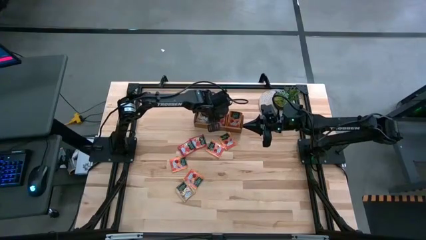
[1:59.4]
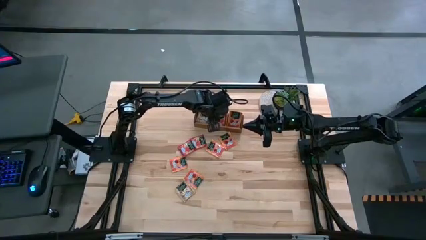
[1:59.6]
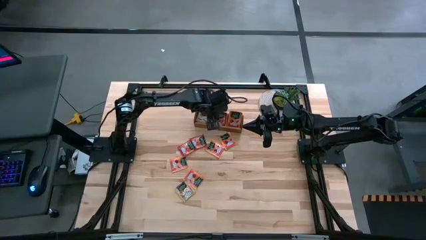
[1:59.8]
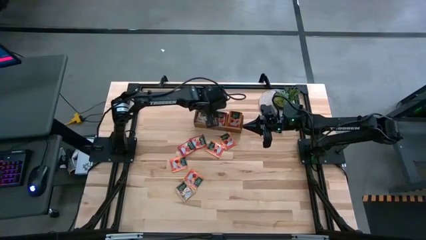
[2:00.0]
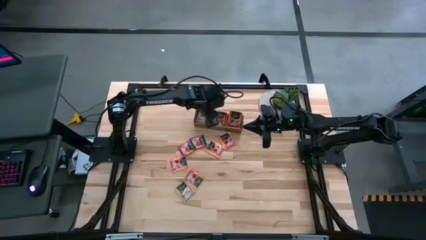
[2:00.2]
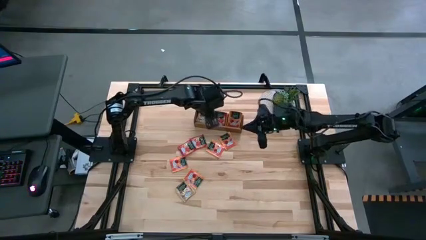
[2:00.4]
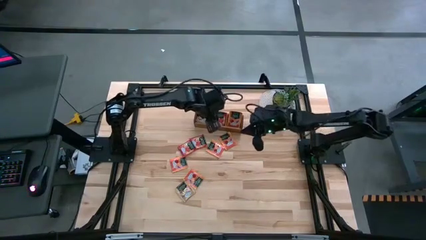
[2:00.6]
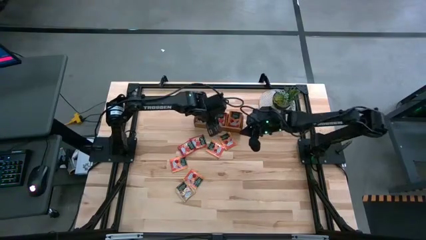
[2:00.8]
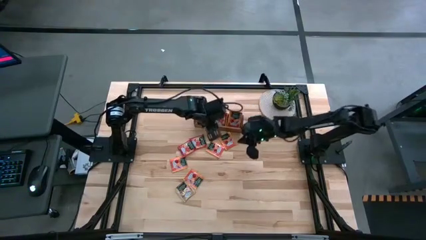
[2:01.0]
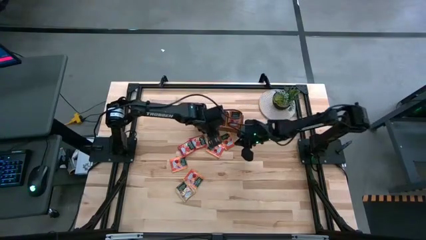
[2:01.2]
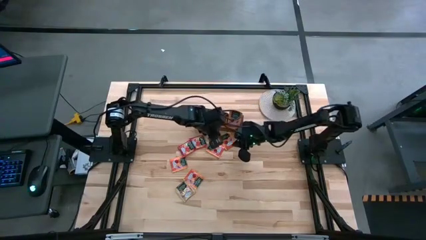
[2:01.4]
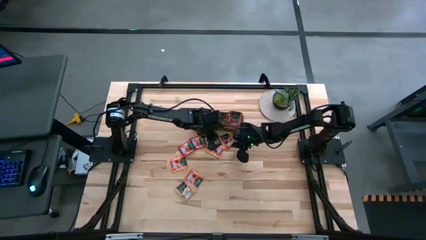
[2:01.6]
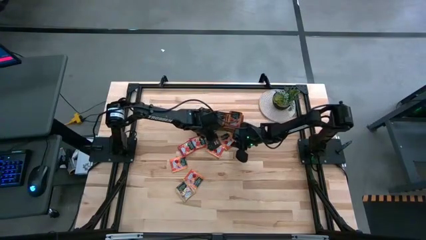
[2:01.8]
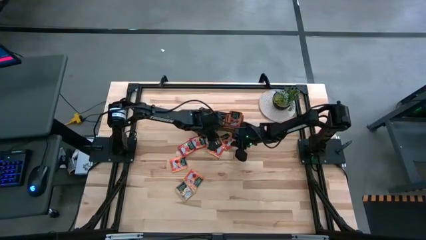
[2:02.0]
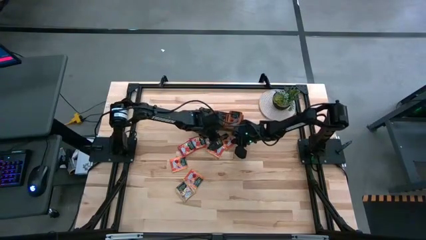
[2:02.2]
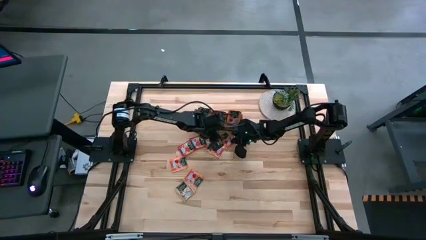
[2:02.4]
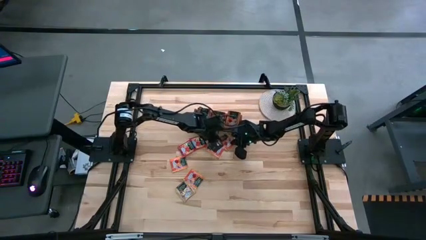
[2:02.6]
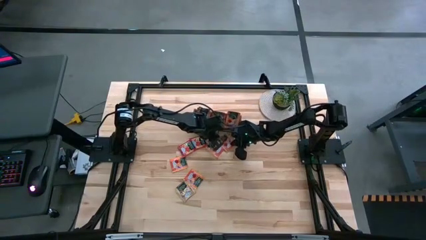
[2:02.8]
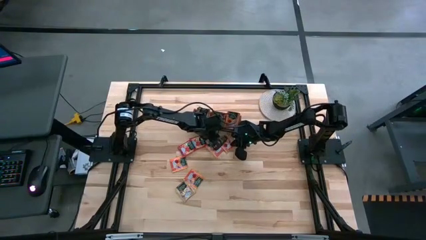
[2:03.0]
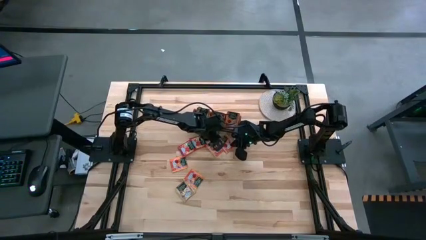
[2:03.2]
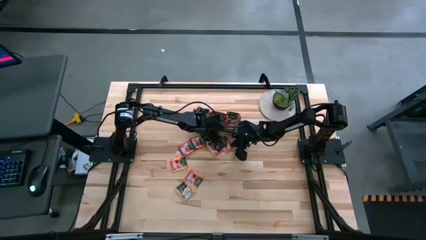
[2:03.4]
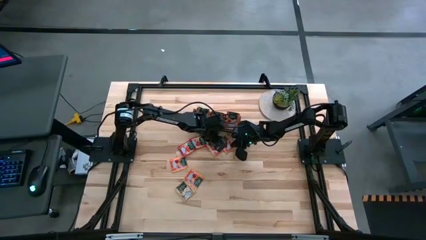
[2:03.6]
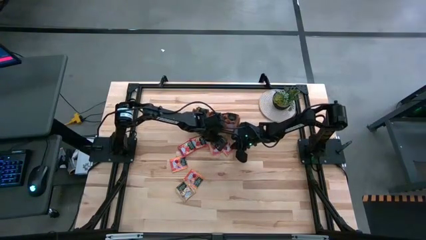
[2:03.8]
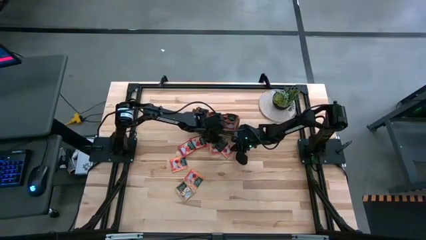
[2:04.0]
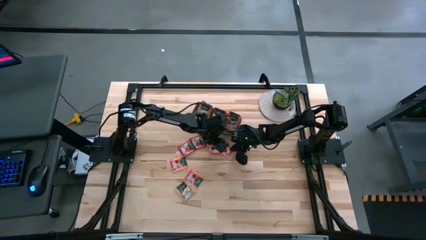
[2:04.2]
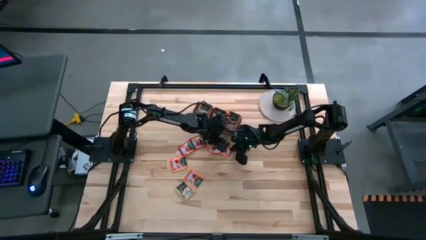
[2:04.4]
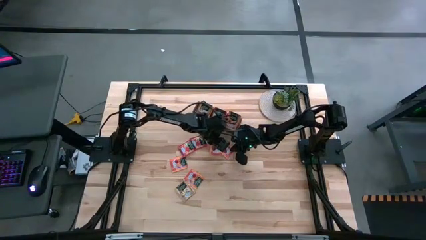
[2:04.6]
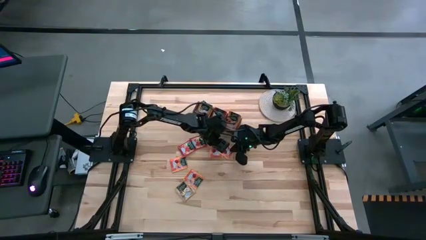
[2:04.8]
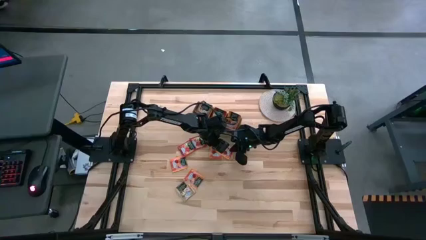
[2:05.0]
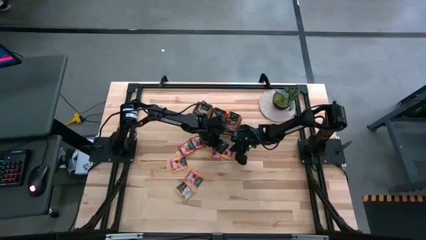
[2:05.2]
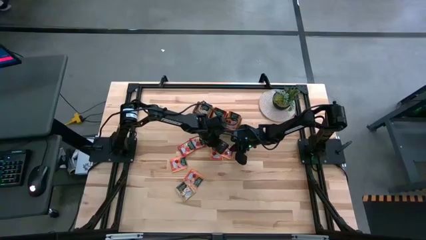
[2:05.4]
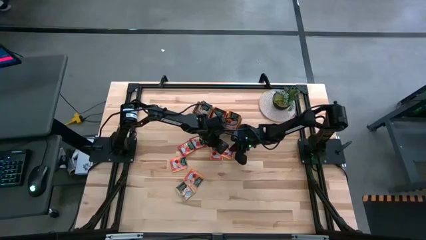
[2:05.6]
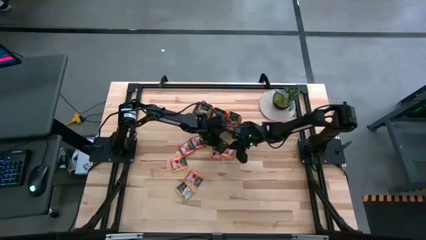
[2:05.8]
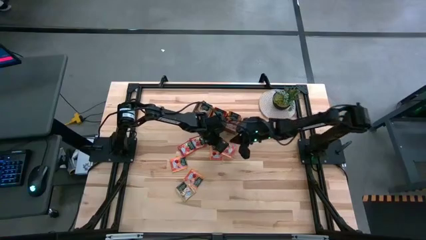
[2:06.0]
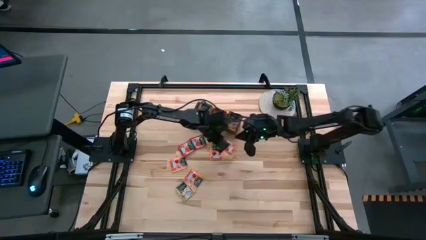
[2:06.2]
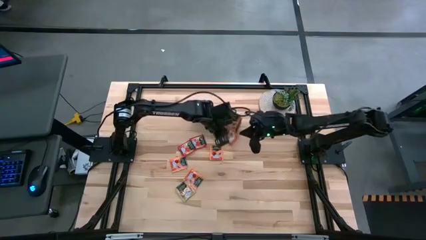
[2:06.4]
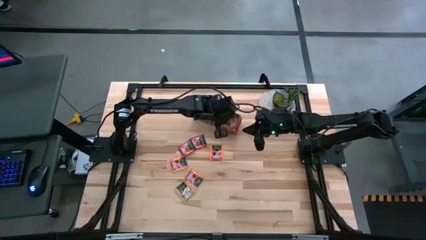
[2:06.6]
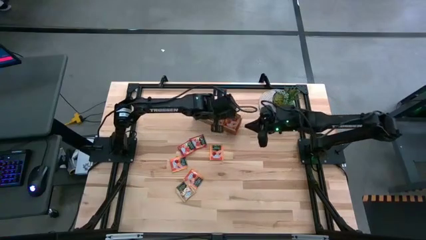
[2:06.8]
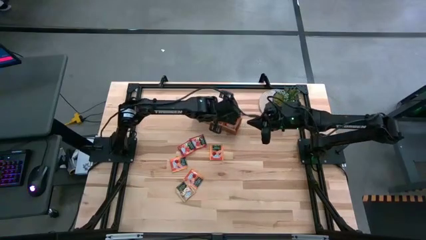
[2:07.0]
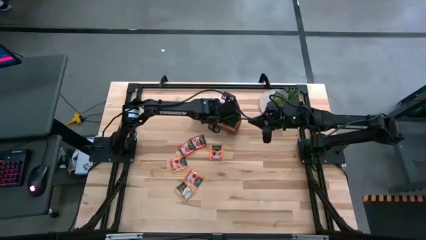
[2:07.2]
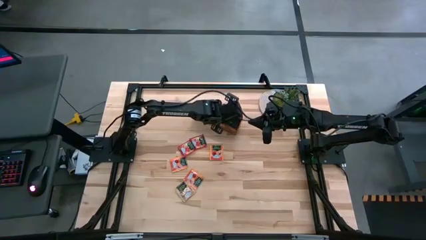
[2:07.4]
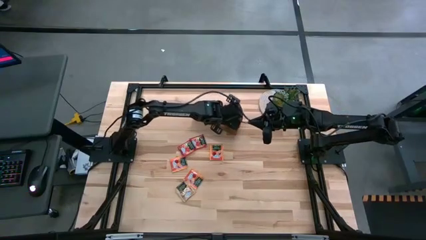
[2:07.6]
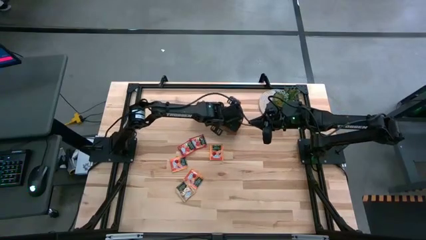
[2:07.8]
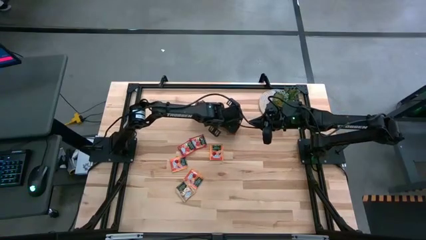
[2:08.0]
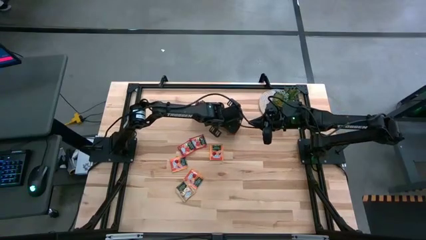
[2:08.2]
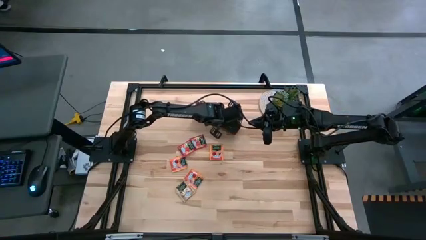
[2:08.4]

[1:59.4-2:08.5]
Task: Pick & Place Tea
Put the orange tea bag into the right section of the wooden organizer

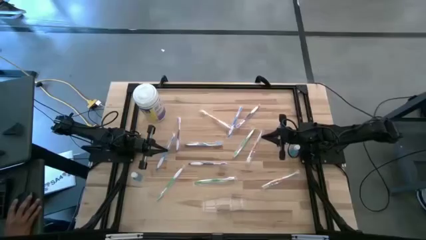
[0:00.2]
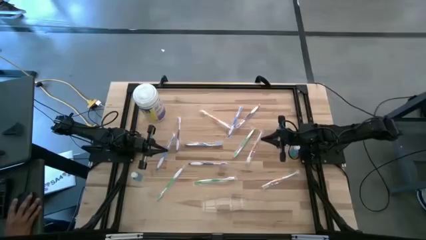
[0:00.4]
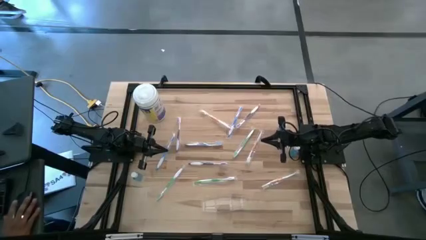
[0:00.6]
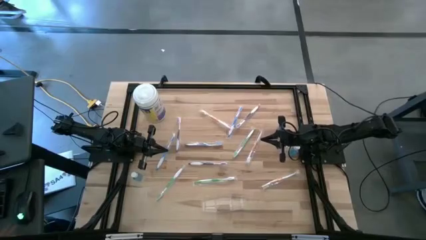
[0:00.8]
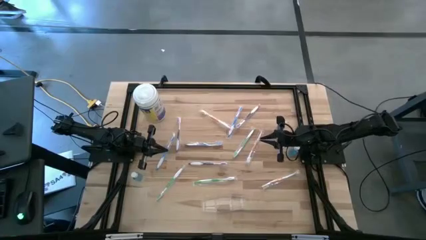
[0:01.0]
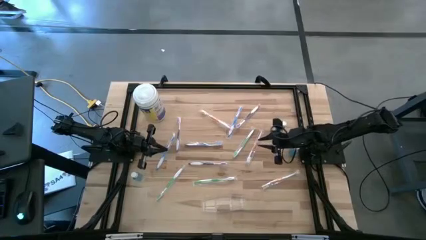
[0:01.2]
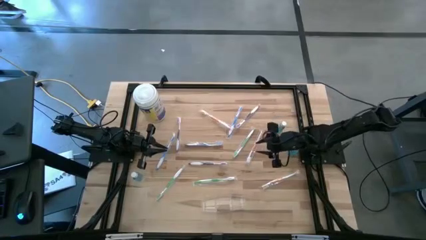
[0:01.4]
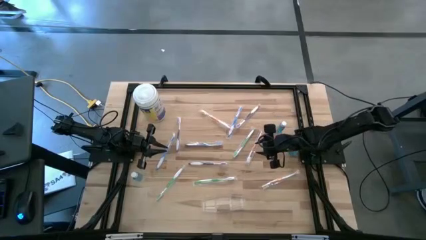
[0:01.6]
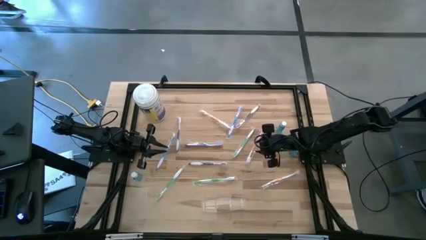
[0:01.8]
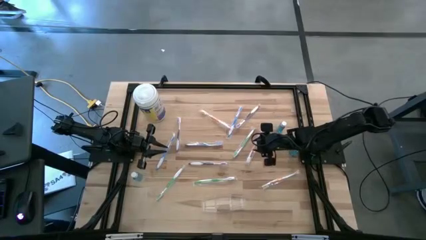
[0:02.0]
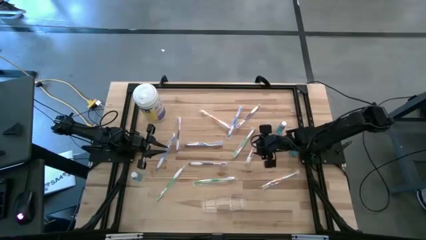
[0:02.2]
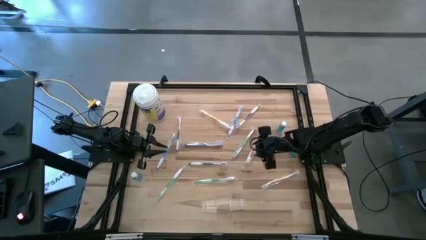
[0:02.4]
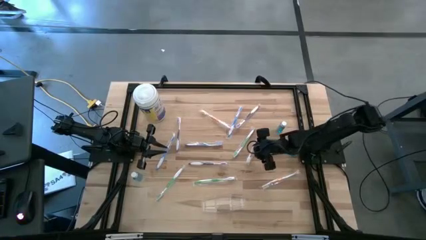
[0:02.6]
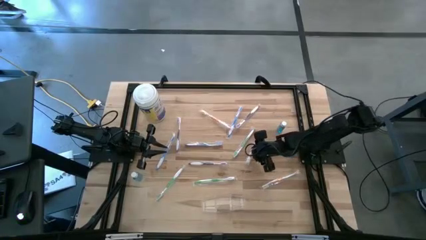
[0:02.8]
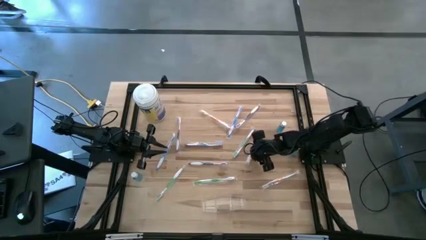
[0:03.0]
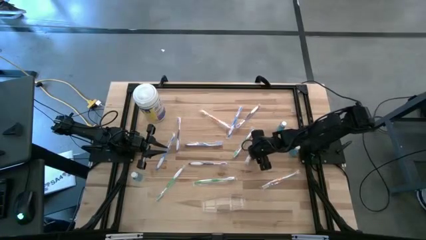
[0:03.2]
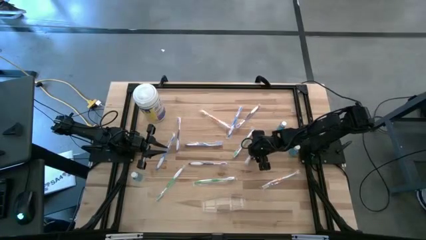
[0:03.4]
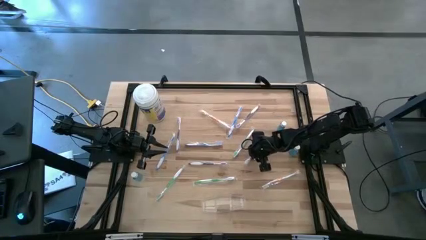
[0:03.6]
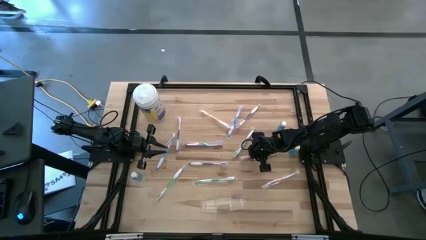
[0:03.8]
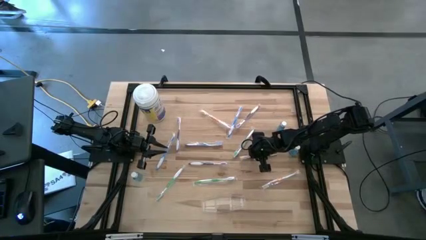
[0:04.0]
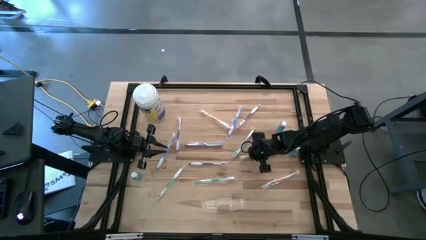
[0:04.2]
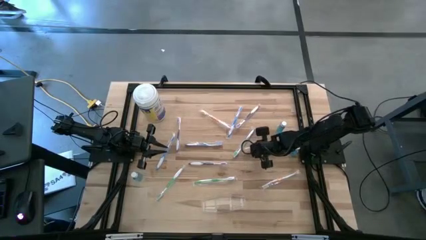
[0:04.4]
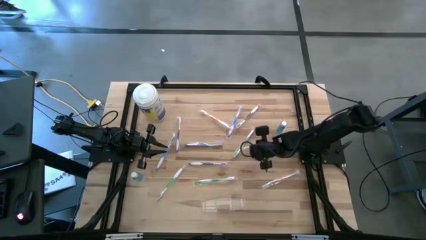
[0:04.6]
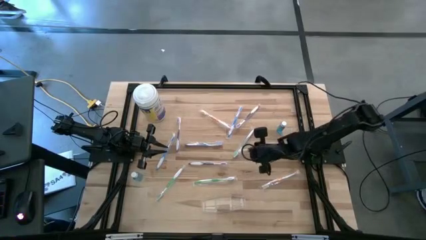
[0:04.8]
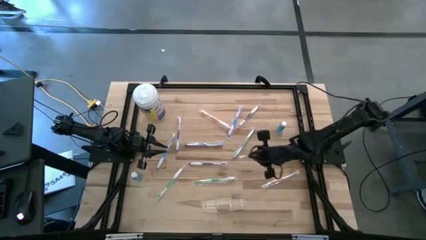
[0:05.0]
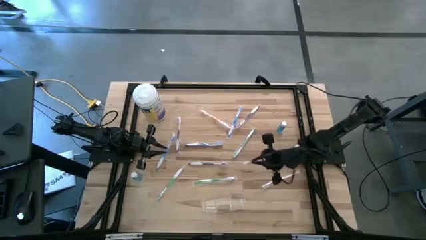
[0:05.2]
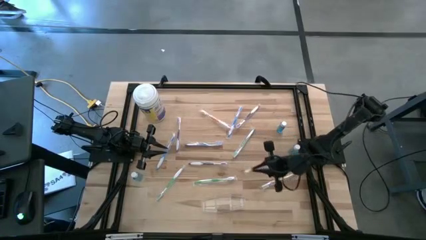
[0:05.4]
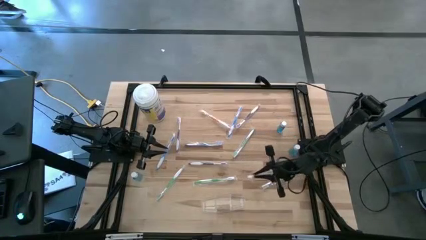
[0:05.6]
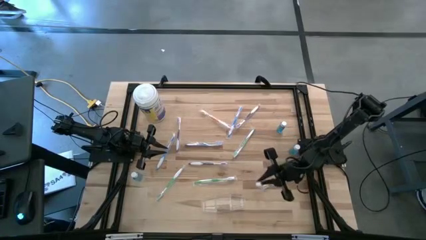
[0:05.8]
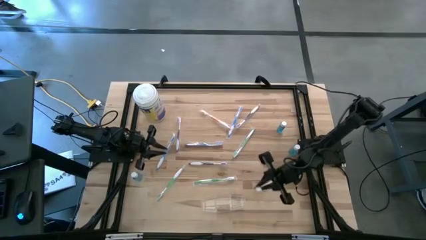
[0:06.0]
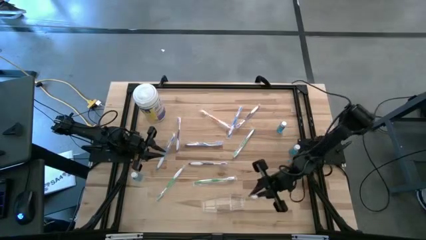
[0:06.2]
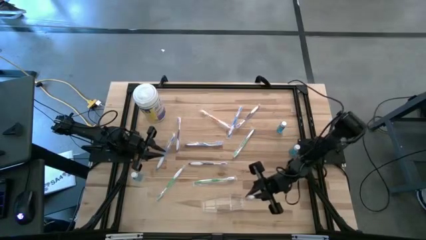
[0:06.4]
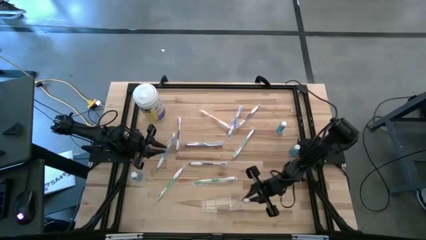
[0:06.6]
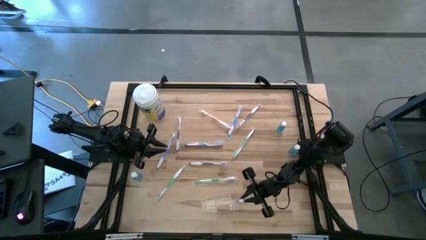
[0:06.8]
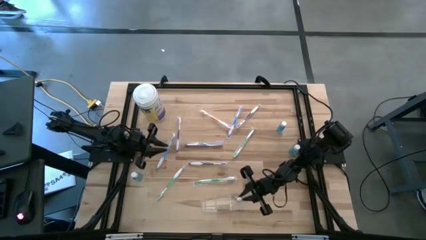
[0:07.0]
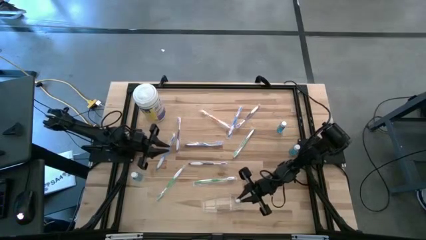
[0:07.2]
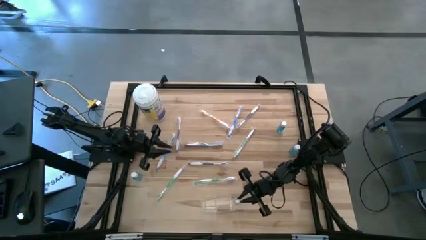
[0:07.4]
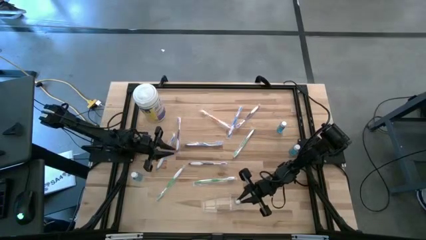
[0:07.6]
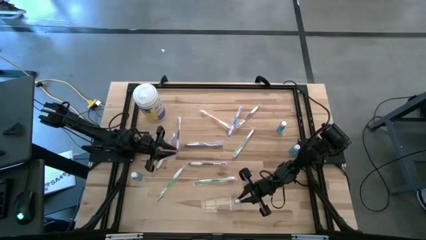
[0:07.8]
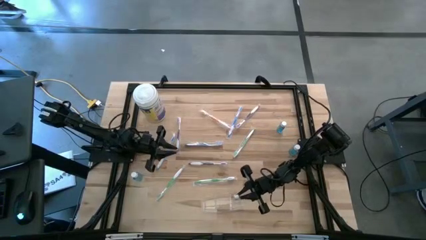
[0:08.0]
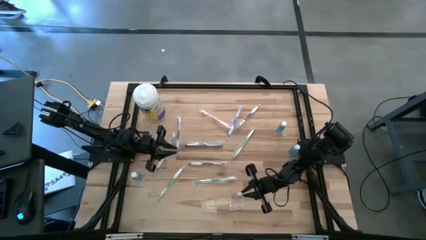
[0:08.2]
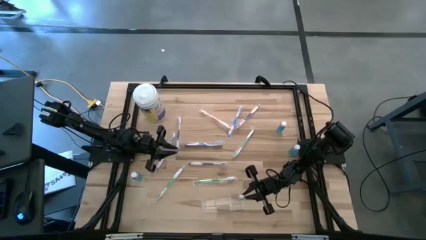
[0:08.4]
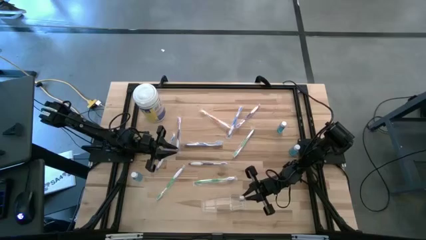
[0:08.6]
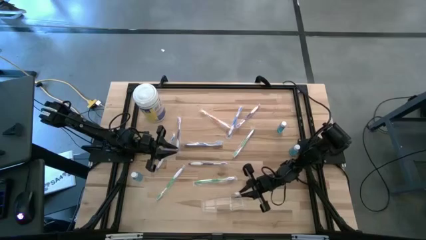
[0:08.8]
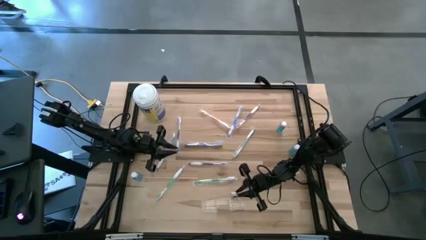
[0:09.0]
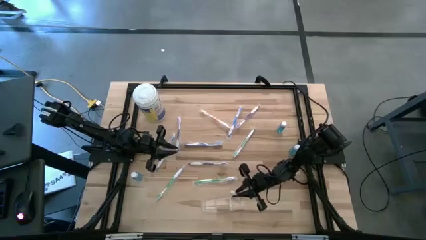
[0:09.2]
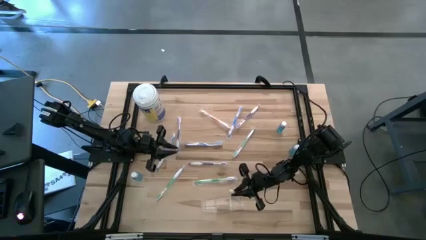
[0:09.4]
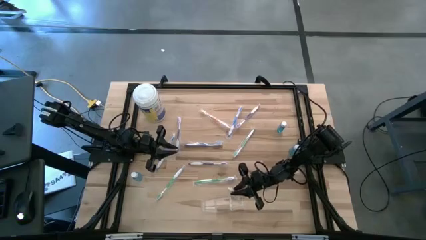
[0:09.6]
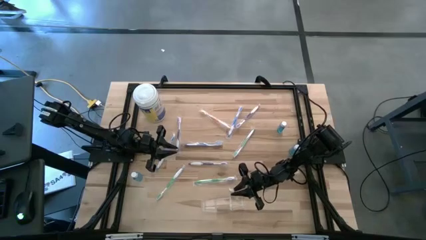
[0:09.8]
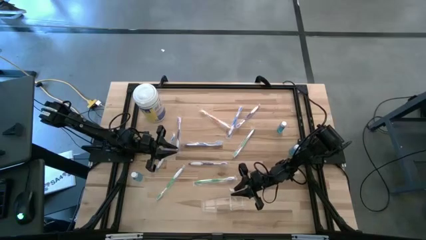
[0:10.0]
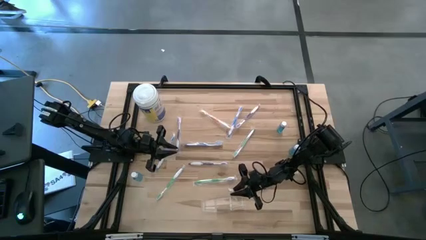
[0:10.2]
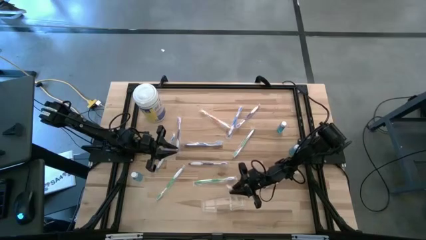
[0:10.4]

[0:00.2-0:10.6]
Task: Pick & Place toothbrushing station
Put the right orange toothbrush into the transparent bin
